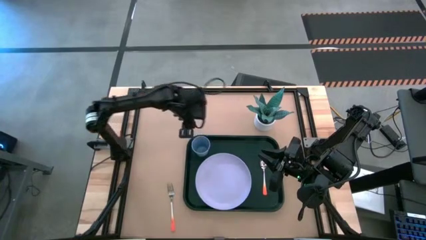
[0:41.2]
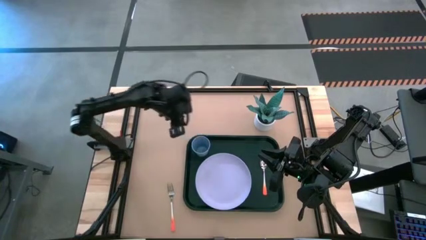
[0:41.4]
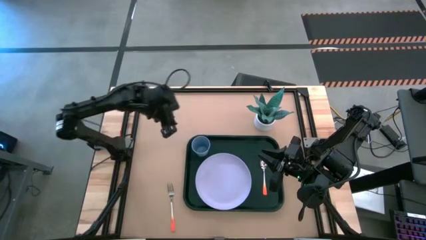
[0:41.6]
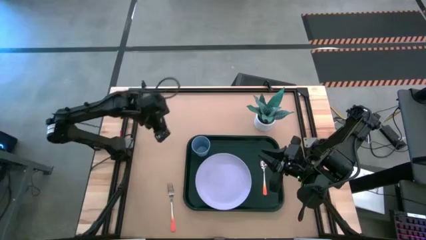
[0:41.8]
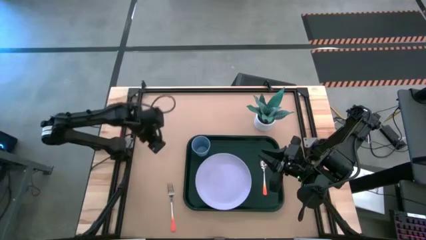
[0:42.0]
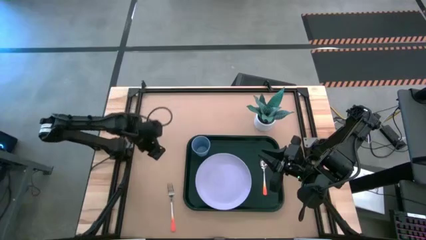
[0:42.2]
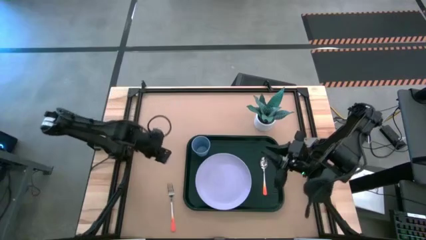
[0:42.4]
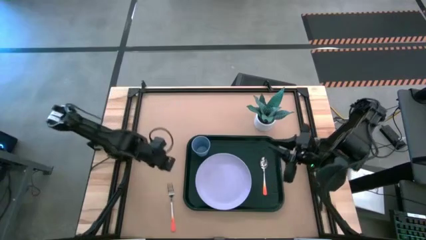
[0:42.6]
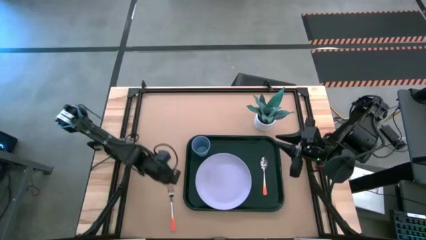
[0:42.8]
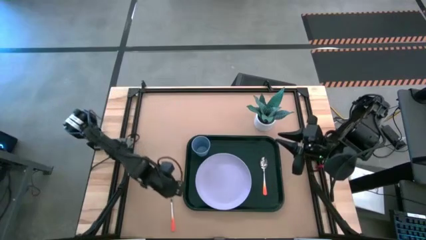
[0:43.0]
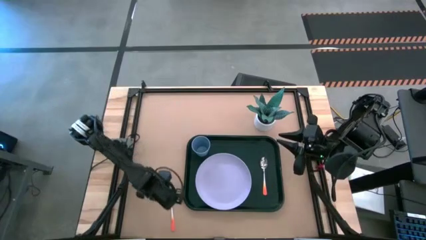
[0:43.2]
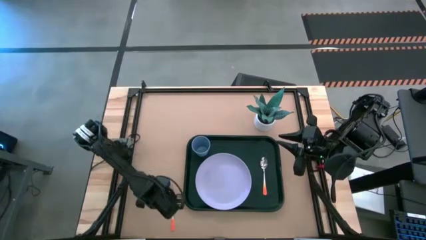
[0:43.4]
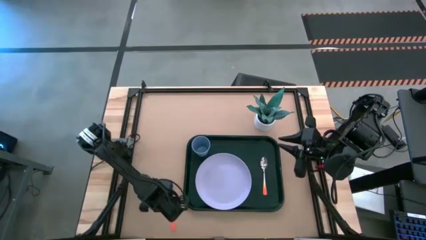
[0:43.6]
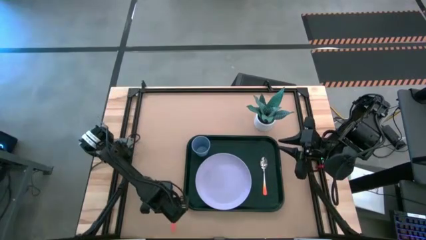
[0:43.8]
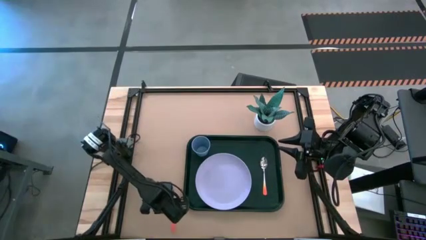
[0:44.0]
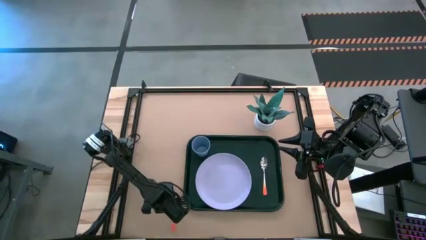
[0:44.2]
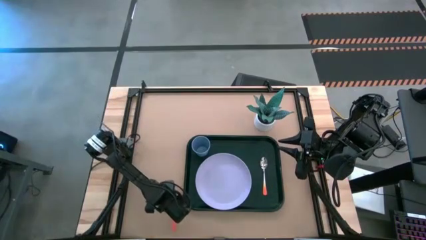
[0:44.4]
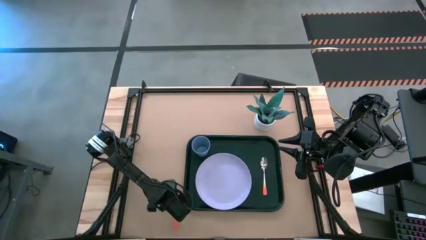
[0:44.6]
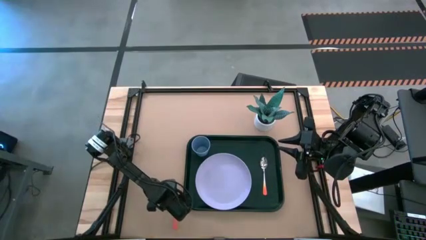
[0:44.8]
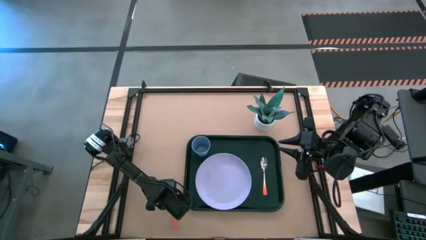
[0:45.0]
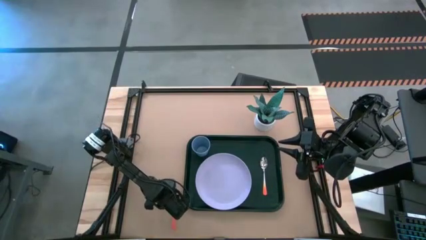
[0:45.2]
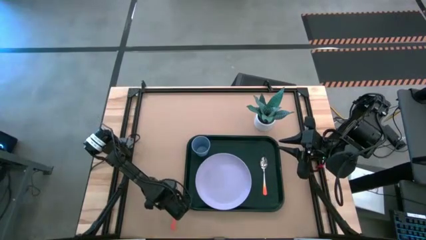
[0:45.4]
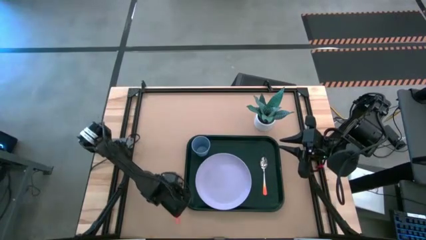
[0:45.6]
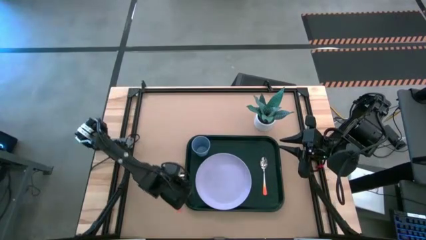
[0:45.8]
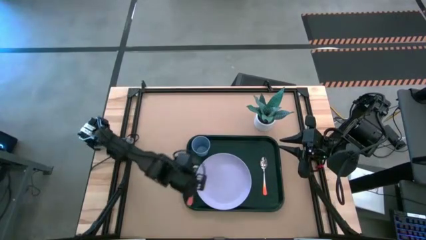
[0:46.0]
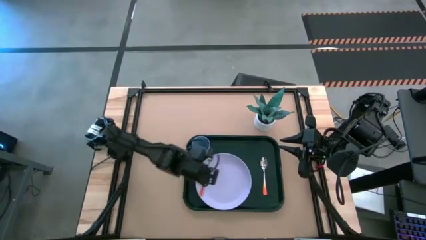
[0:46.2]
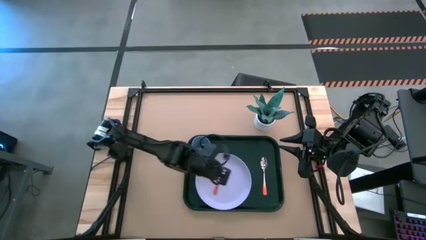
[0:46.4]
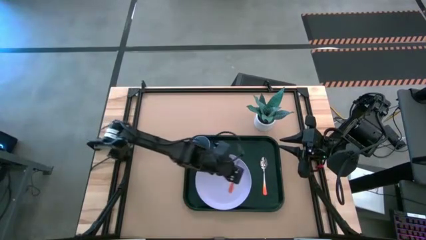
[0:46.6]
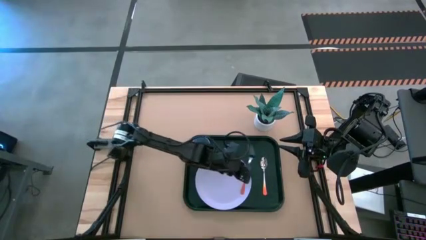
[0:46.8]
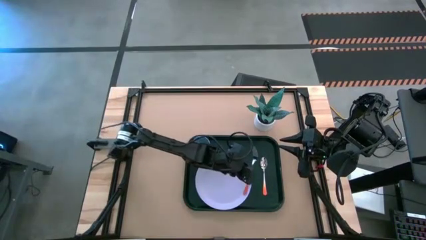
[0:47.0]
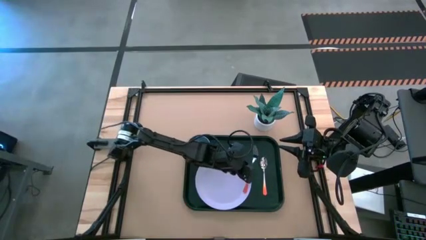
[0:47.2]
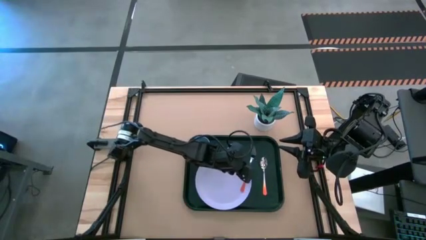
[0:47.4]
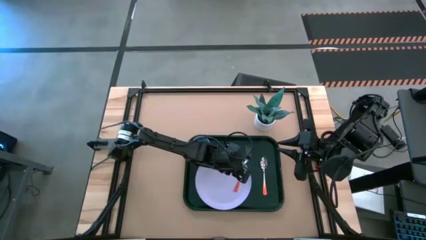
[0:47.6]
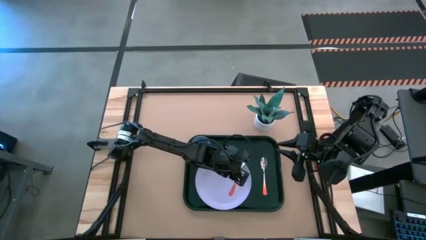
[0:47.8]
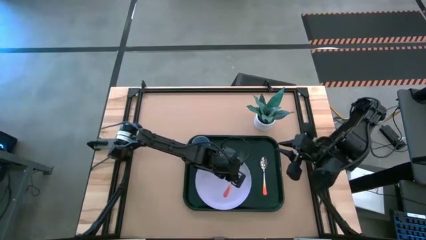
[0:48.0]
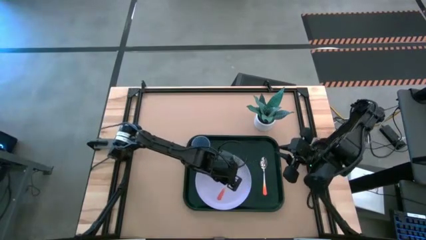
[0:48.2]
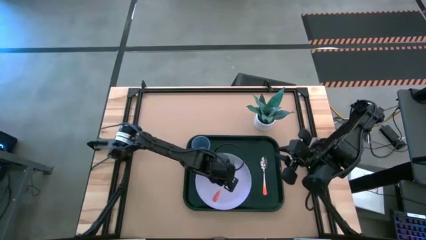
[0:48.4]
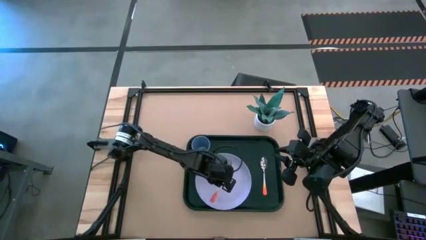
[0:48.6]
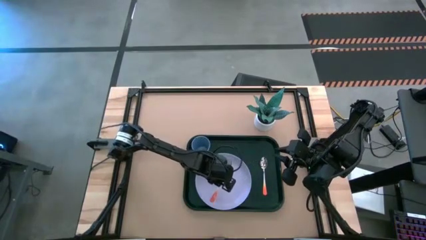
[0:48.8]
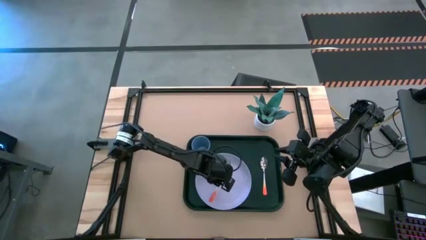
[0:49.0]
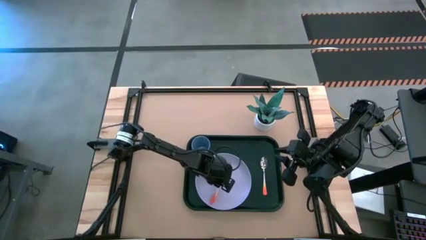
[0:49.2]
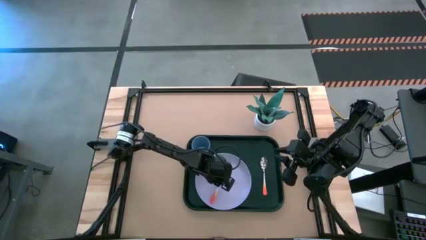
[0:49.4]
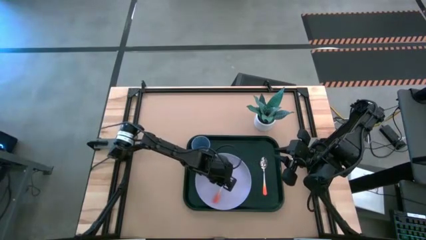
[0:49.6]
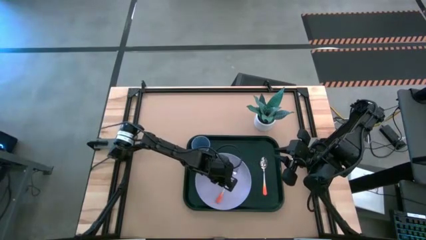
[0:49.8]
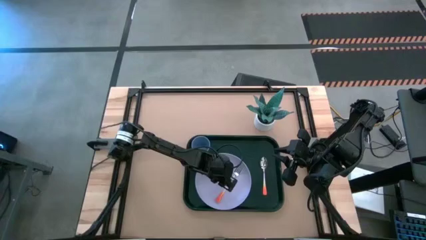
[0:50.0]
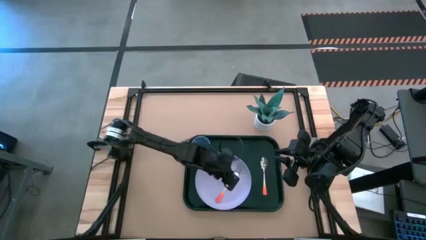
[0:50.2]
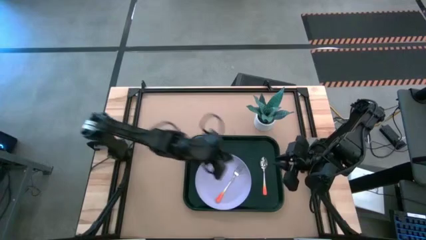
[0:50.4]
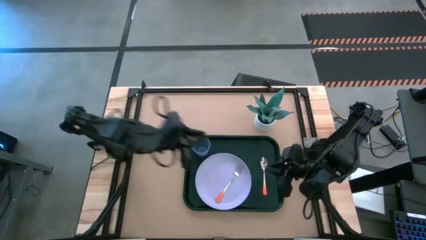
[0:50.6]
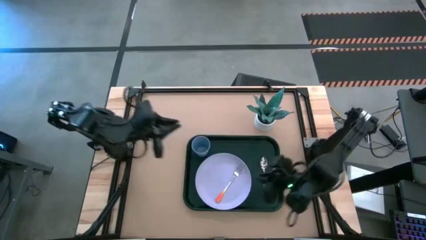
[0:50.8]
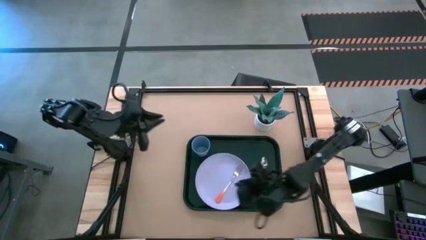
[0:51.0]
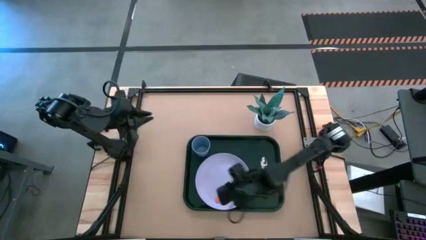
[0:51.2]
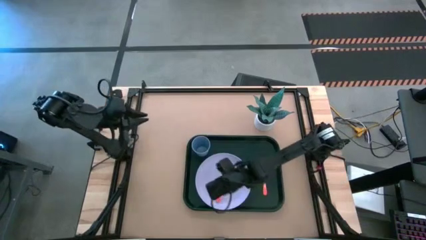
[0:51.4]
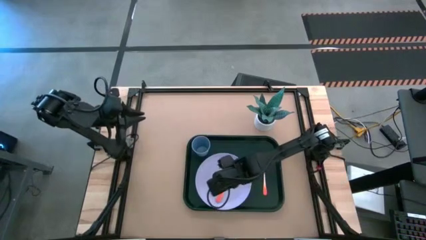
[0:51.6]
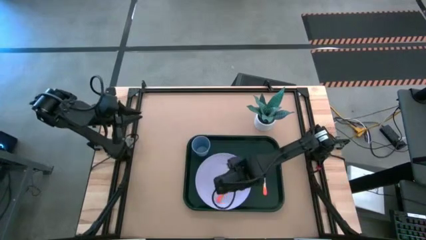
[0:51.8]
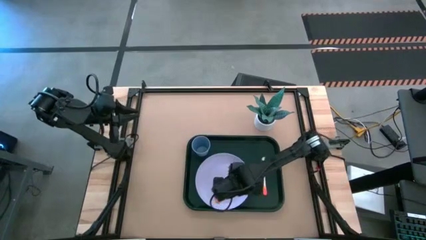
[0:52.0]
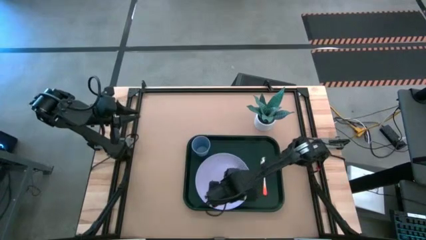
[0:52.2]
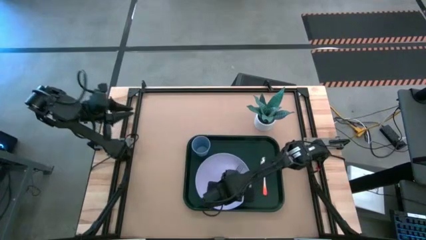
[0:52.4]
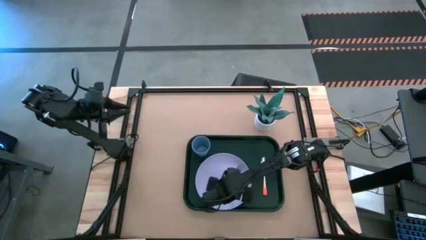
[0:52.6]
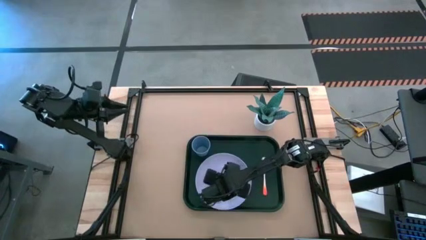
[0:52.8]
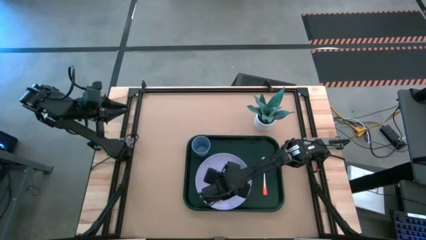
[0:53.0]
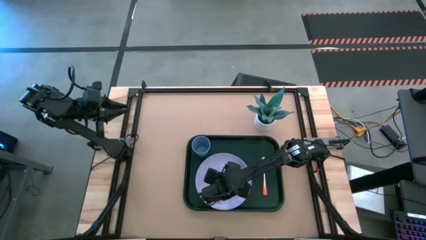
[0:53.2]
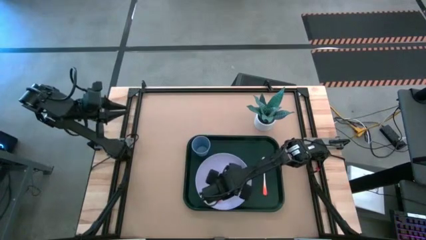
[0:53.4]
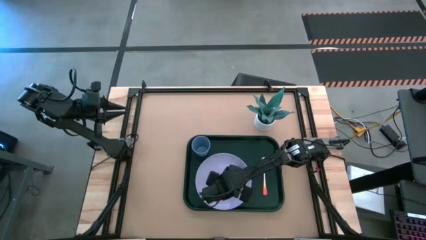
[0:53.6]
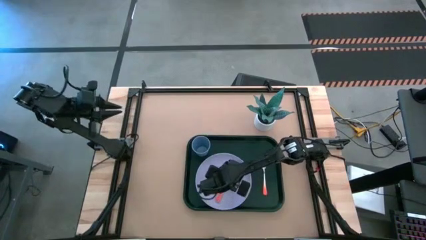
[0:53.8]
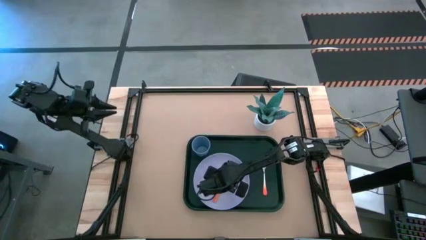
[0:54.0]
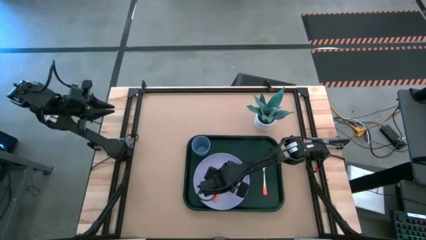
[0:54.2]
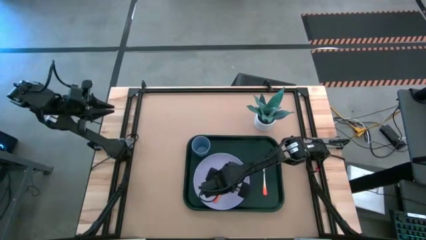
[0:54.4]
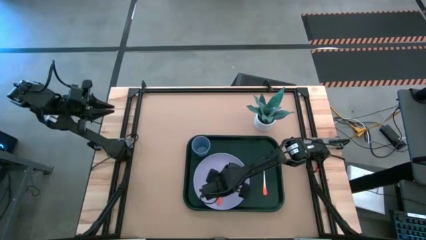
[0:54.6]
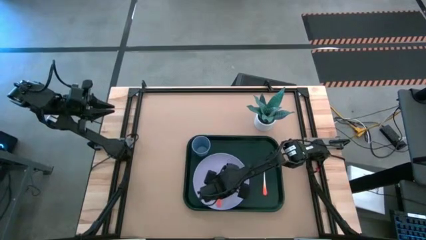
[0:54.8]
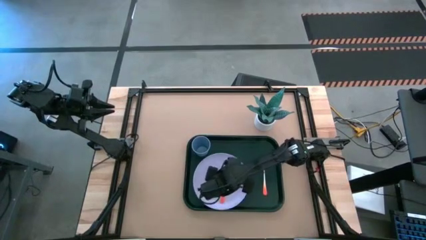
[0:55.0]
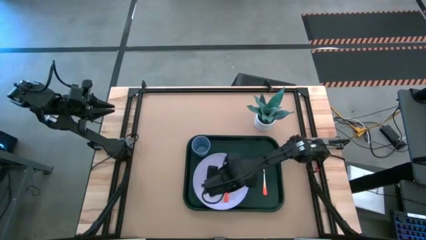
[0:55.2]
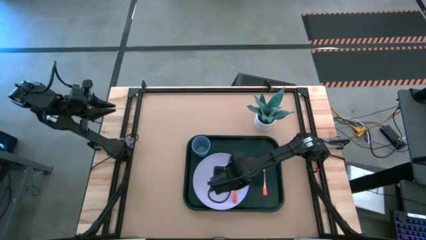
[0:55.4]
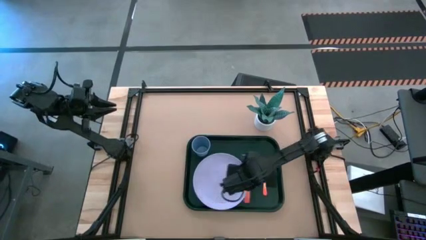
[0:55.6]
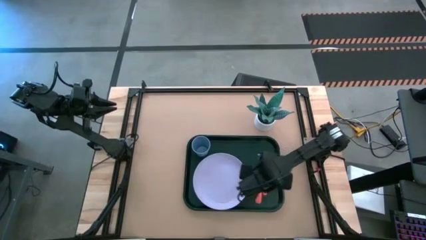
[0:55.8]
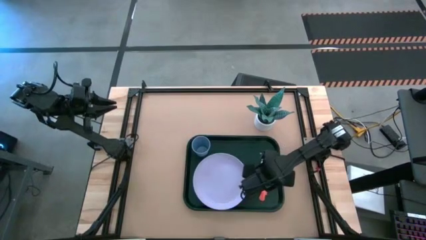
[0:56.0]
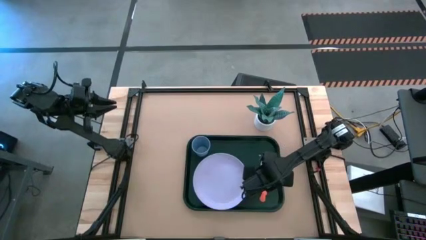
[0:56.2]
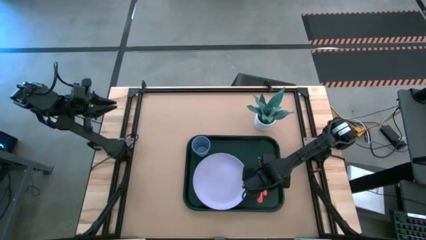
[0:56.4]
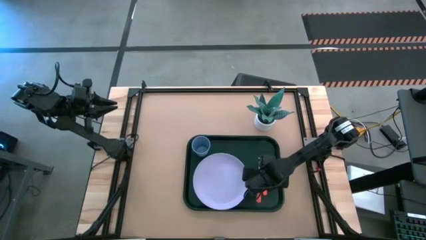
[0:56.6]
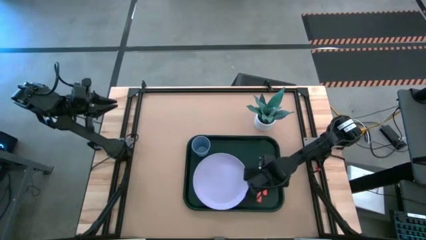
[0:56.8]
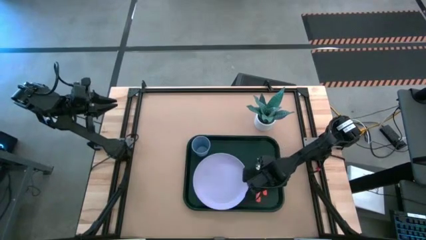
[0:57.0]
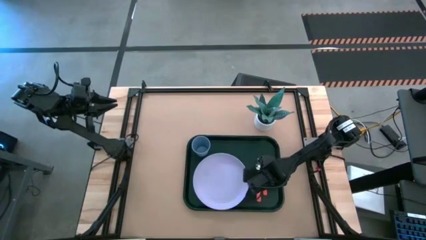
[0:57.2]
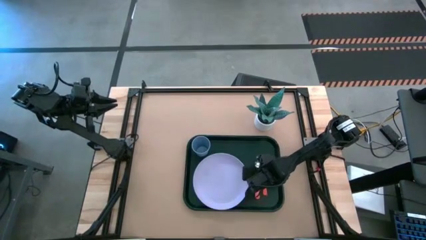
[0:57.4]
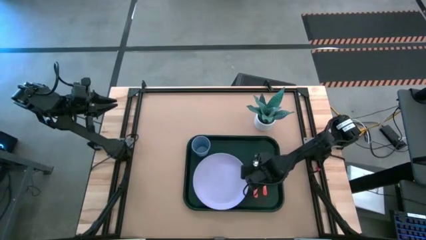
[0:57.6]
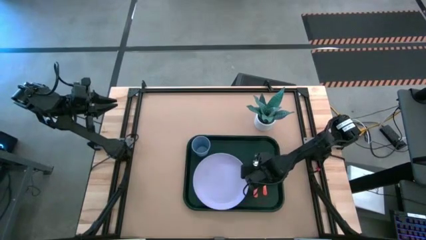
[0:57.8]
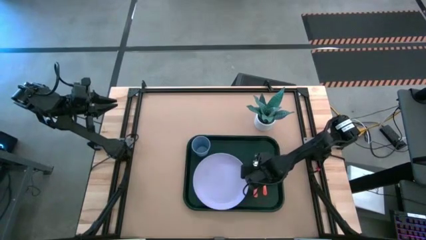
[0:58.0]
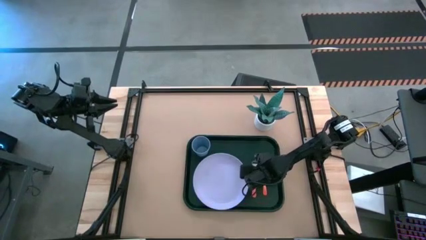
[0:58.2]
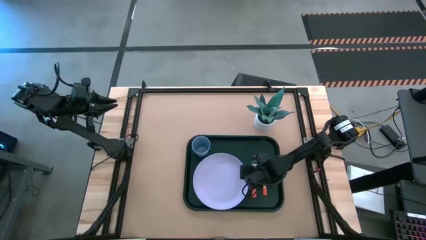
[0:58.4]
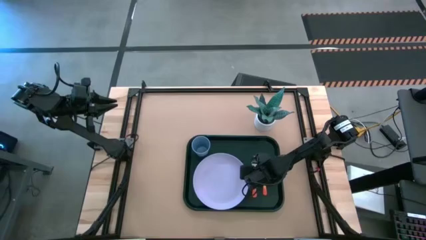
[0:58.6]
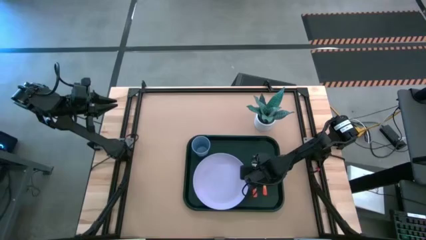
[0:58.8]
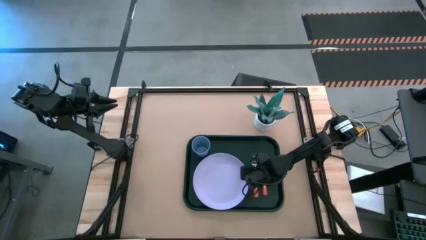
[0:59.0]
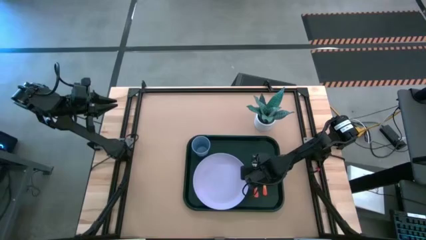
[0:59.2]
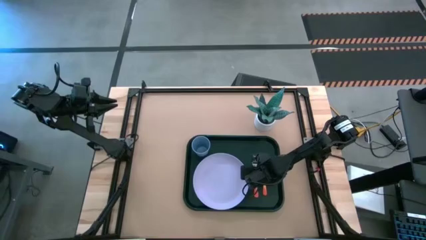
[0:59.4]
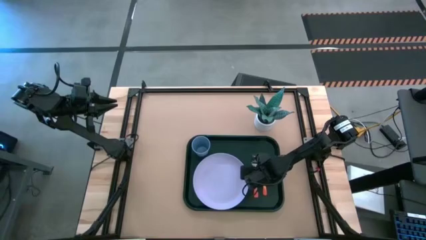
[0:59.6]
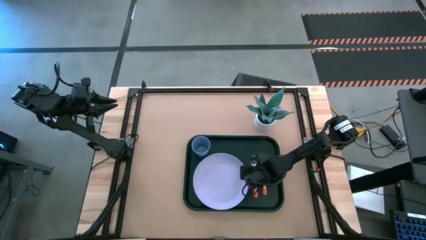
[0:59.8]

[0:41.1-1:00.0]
Task: Pick and place plate/cup/fork/spoon on tray
Put the orange fork on the dark green serving tray to the left of the orange spoon
